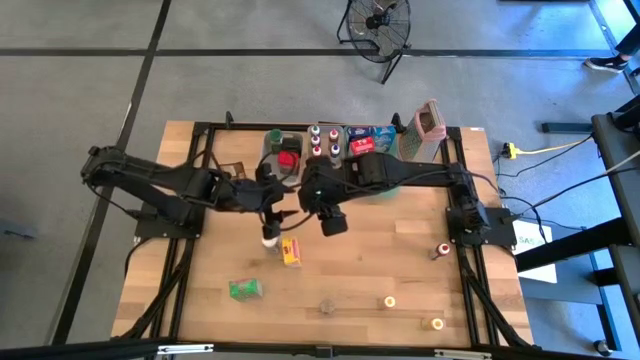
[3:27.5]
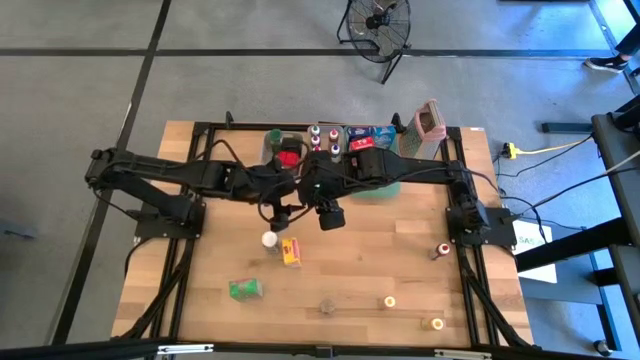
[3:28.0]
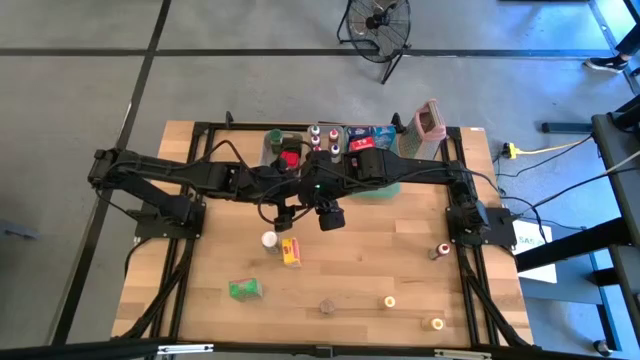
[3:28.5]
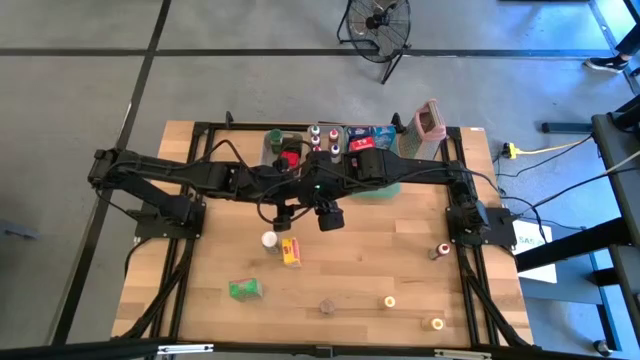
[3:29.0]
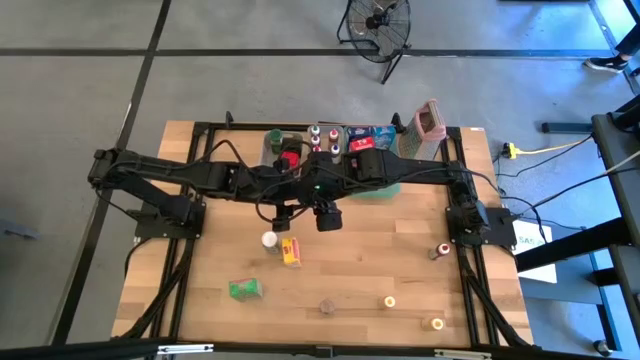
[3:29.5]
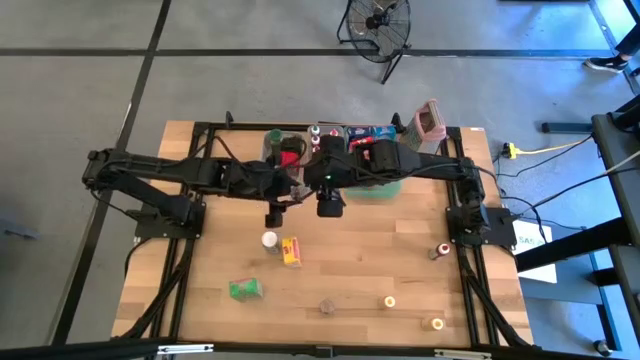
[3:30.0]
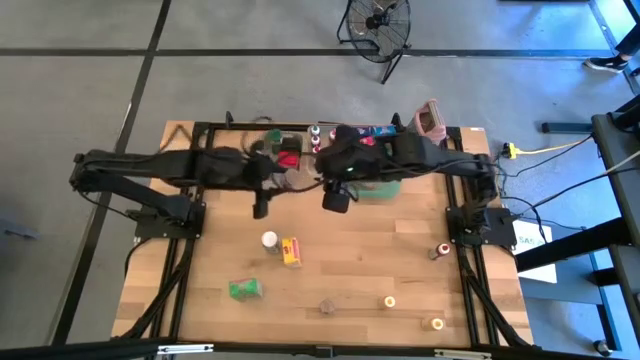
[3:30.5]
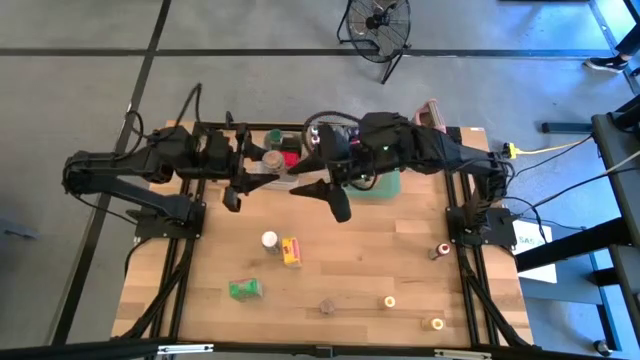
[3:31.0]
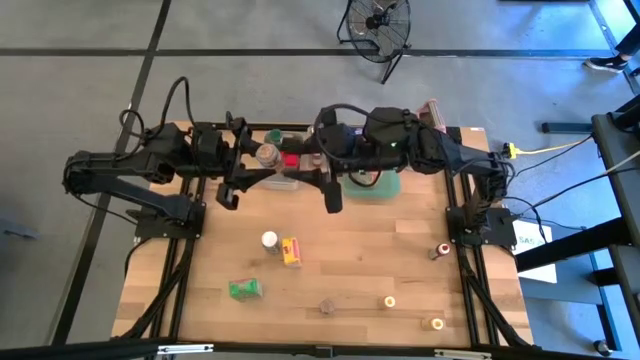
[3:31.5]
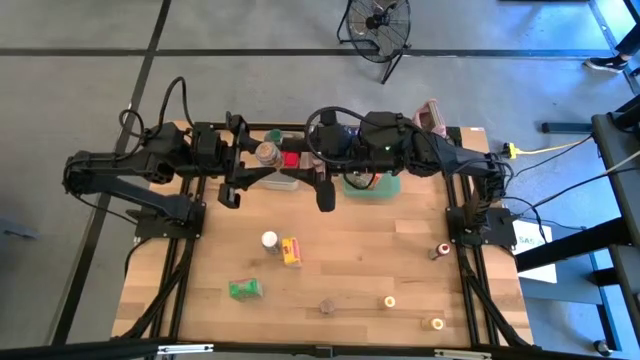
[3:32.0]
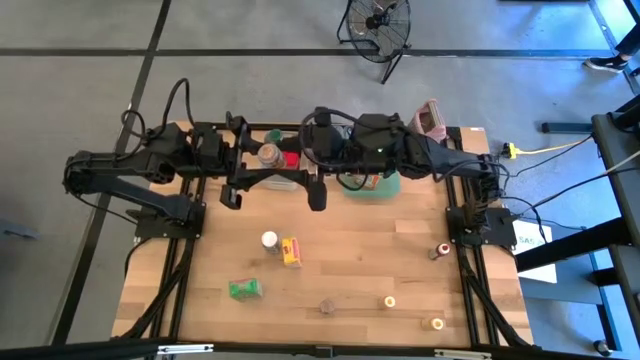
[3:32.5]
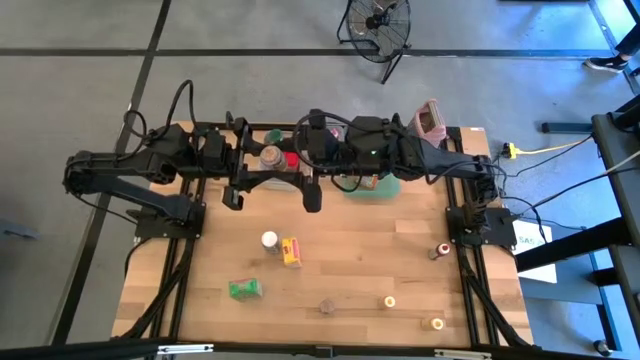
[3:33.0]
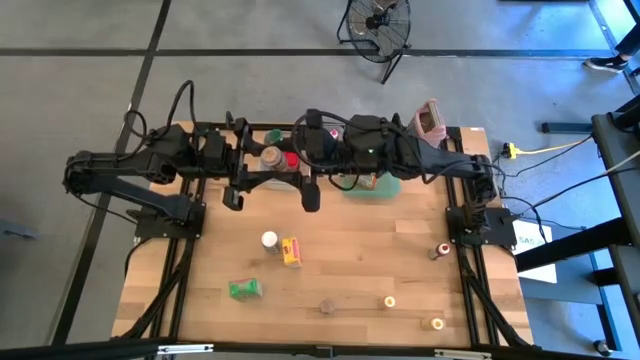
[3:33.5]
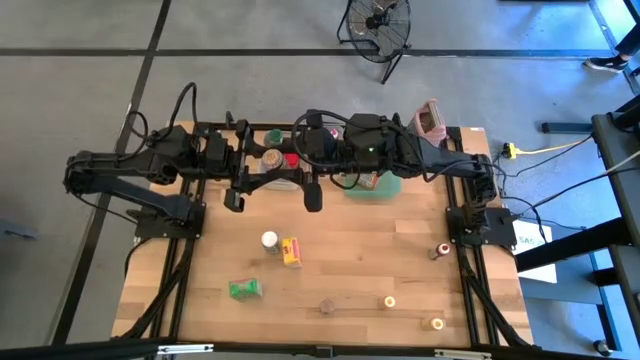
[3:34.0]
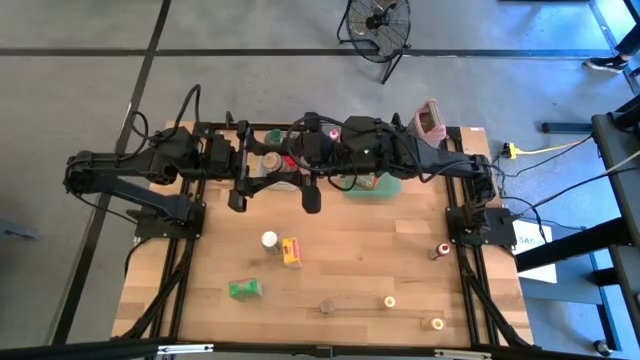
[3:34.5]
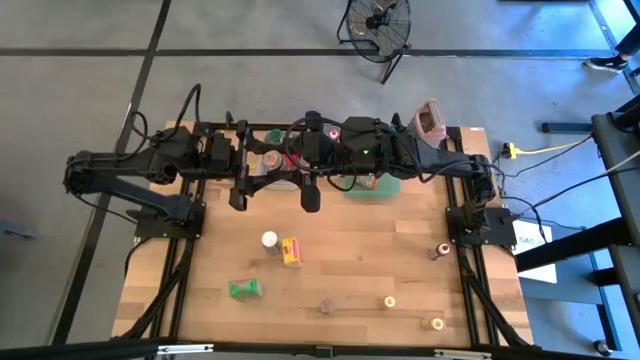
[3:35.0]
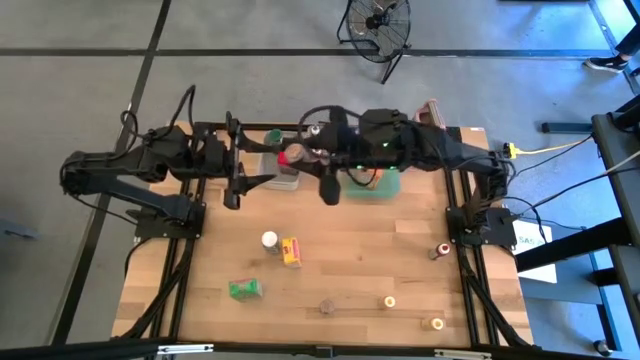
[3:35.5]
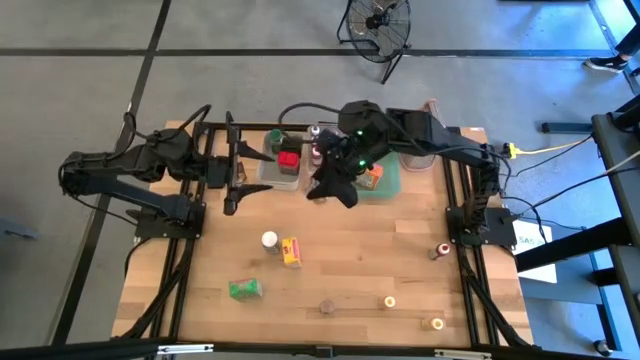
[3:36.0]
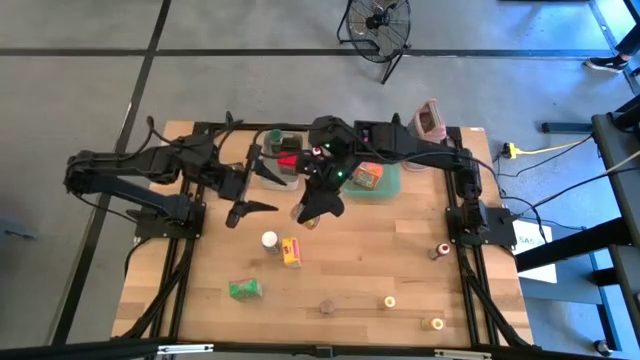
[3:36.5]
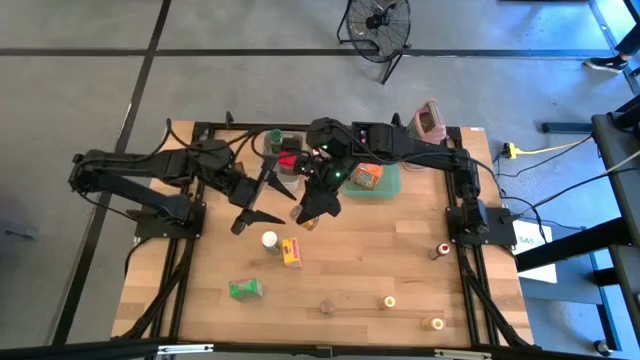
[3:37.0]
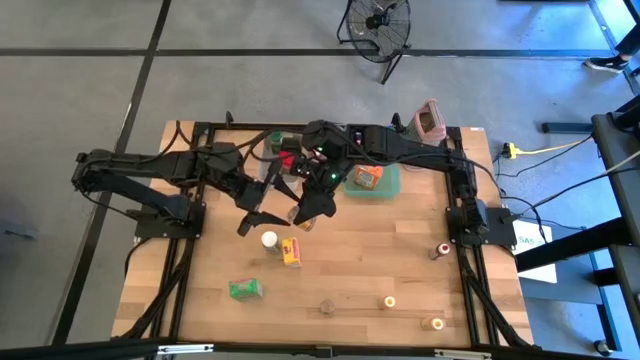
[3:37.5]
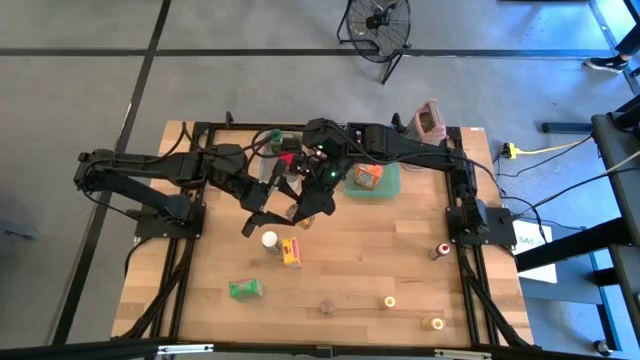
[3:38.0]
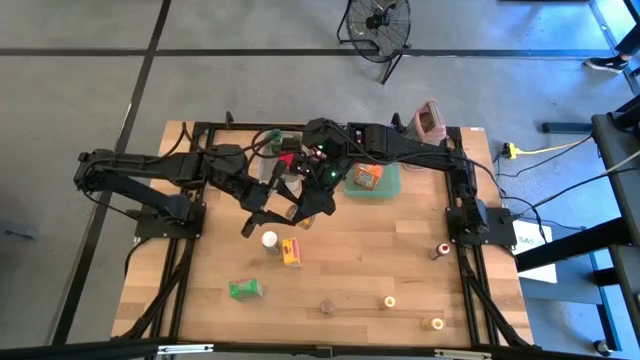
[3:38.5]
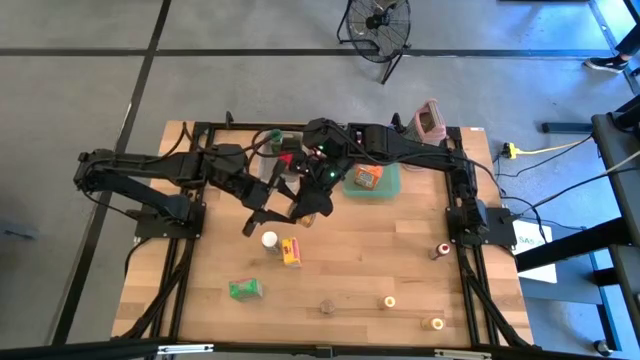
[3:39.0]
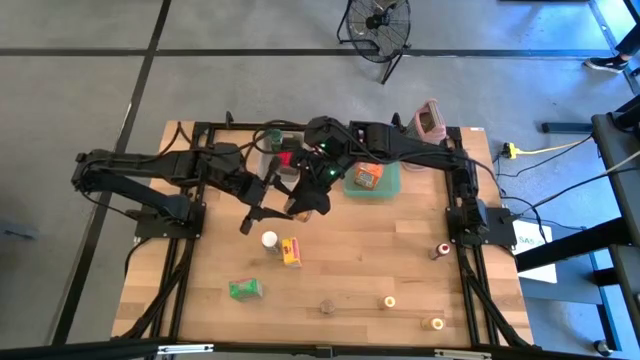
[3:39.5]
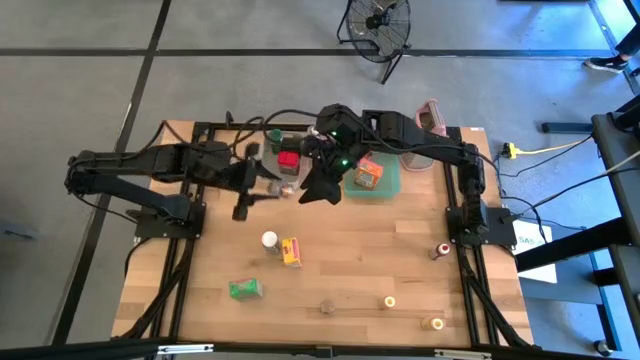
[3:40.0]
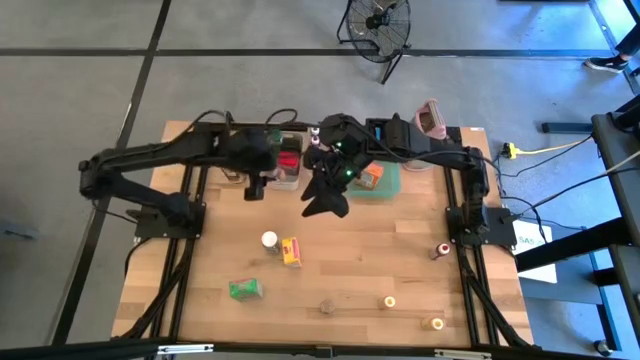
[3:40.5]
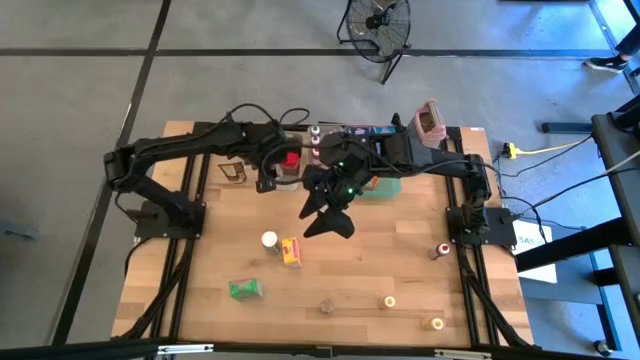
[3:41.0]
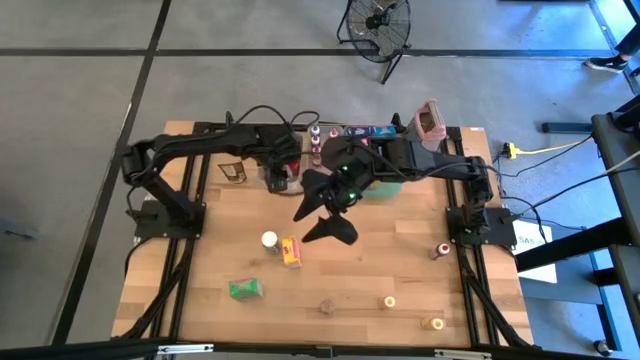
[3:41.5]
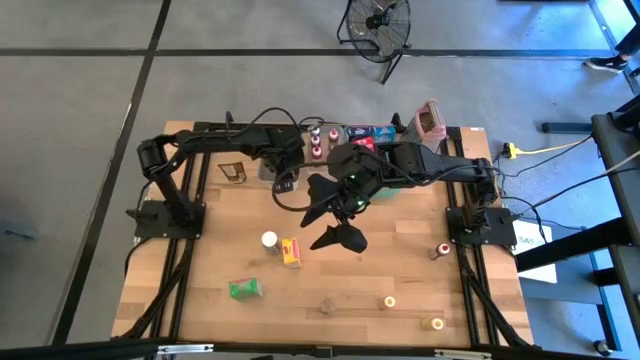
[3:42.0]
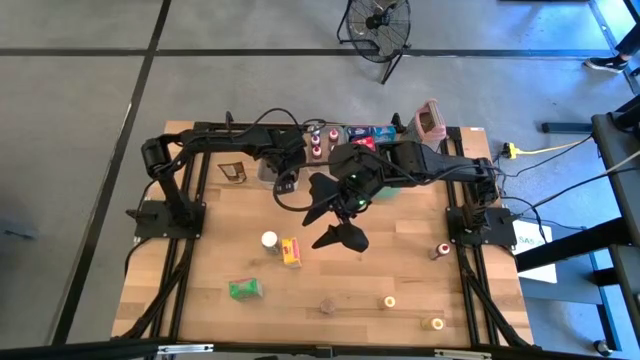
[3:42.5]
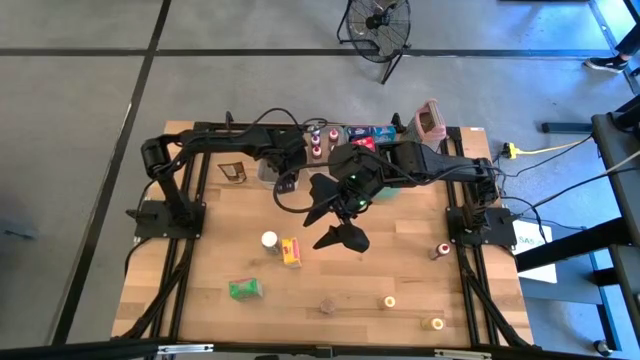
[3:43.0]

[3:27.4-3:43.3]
Task: Pick & Place Kitchen Items
Put the right brown seasoning bottle into the gray bin

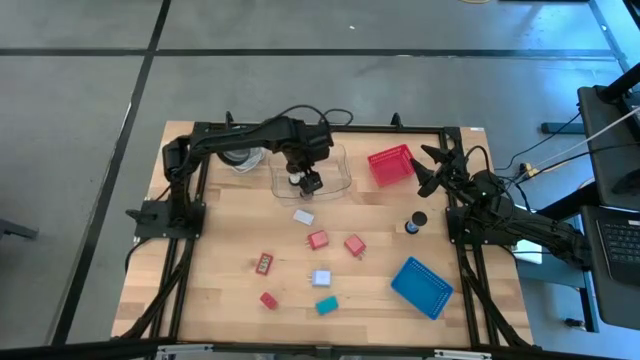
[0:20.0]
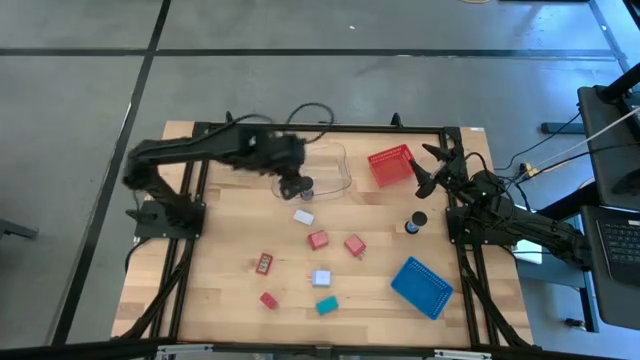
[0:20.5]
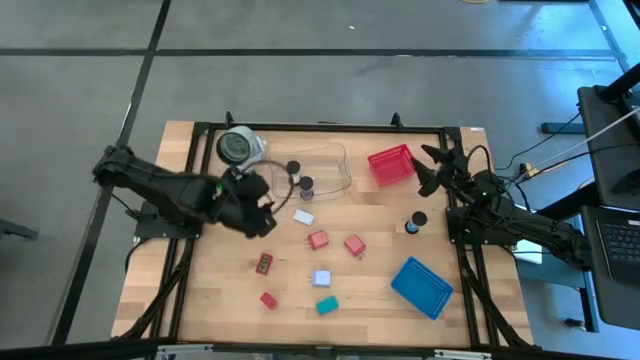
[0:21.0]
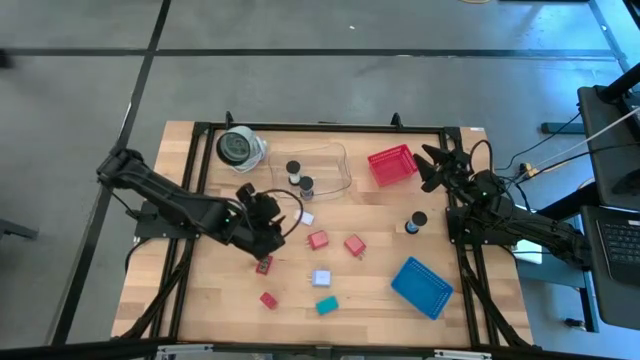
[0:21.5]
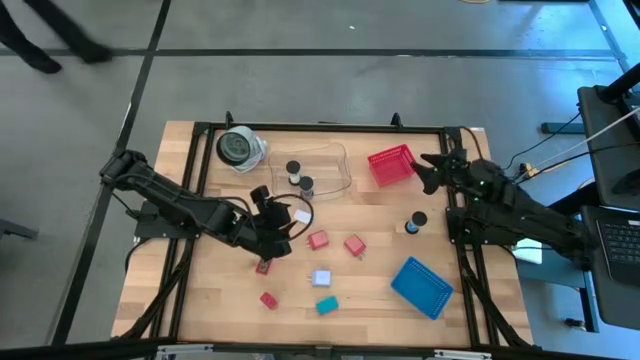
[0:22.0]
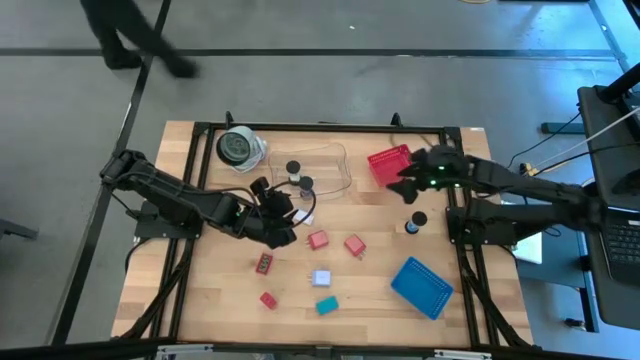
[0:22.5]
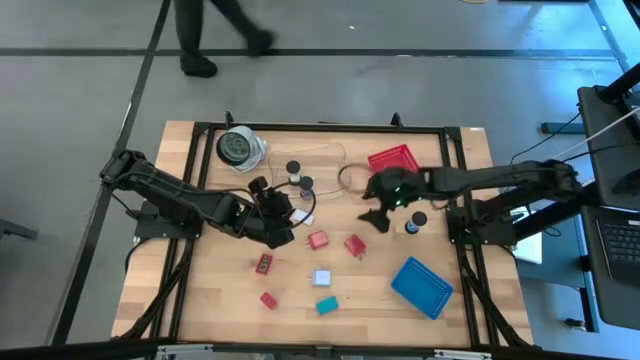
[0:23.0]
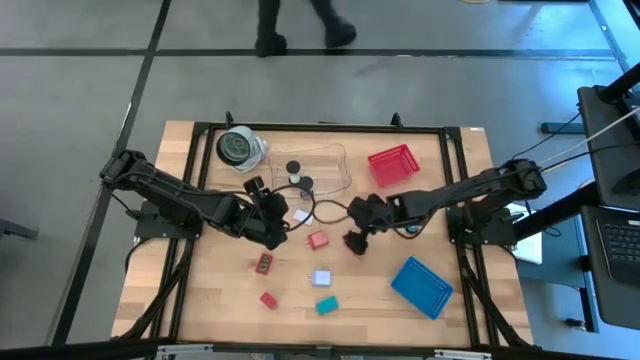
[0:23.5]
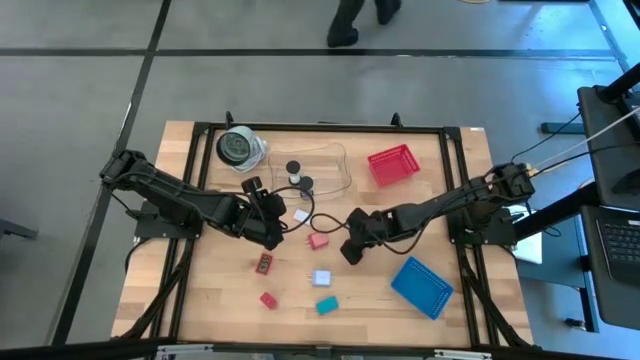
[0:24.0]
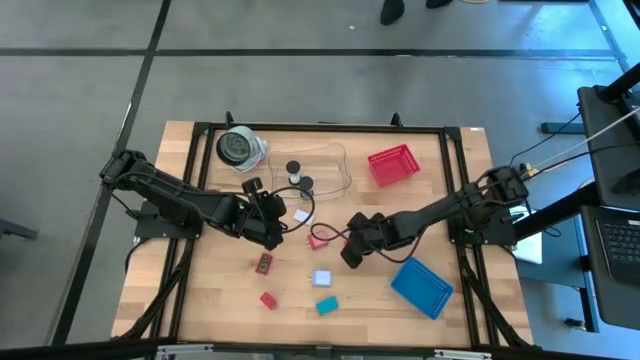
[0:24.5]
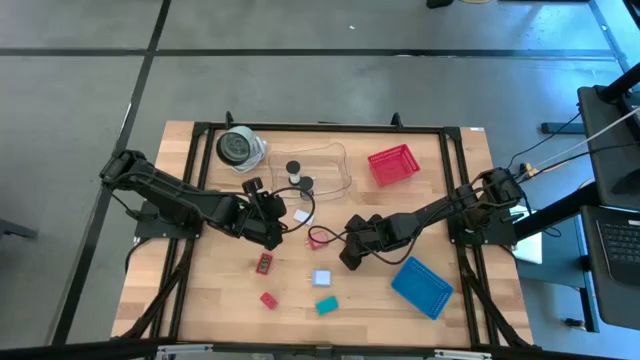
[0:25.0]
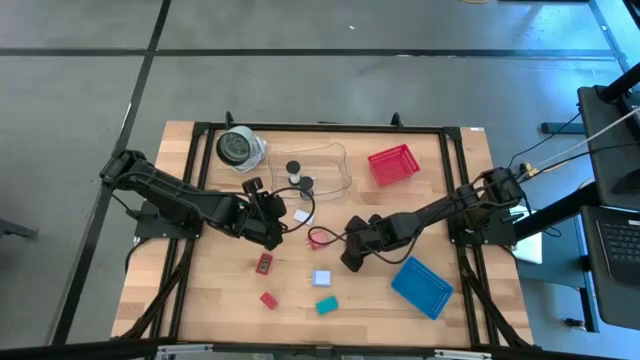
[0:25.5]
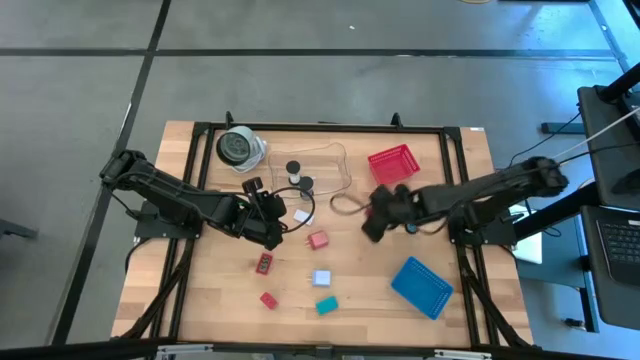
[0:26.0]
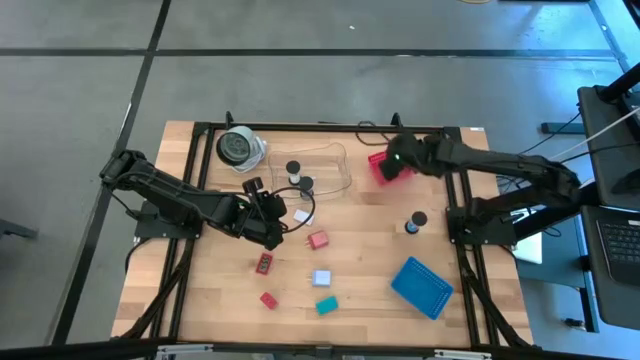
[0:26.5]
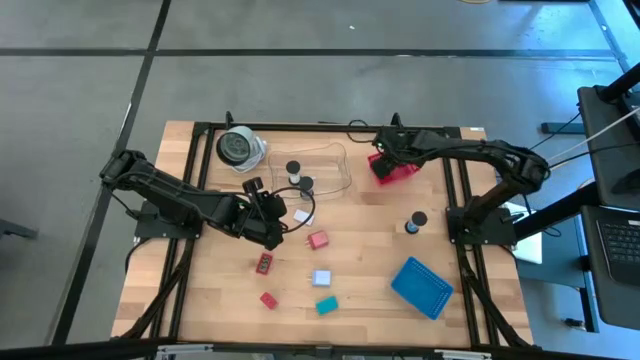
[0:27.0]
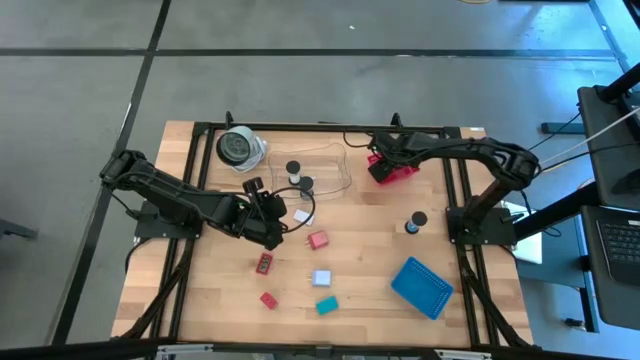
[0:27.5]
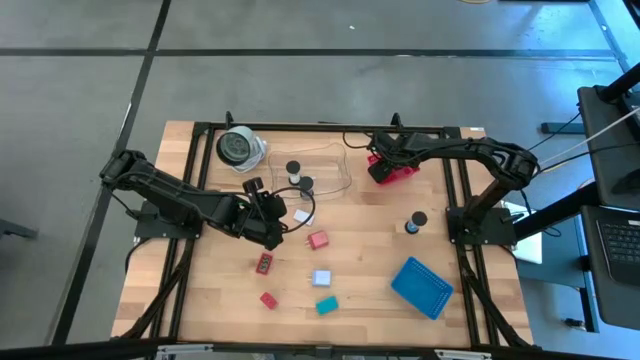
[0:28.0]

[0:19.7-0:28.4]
Task: Pick & Place Office items
Put the right red charger adapter into the red bin
